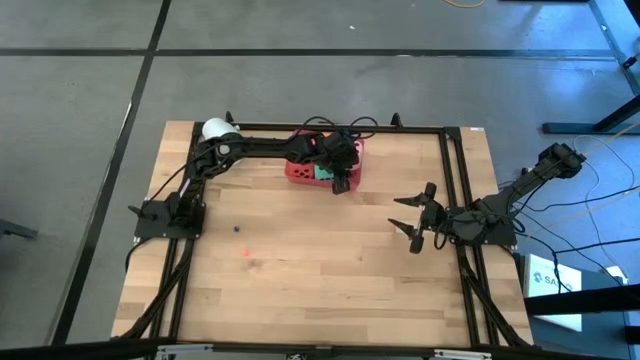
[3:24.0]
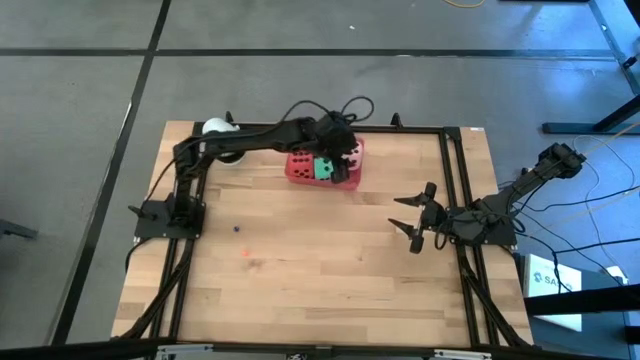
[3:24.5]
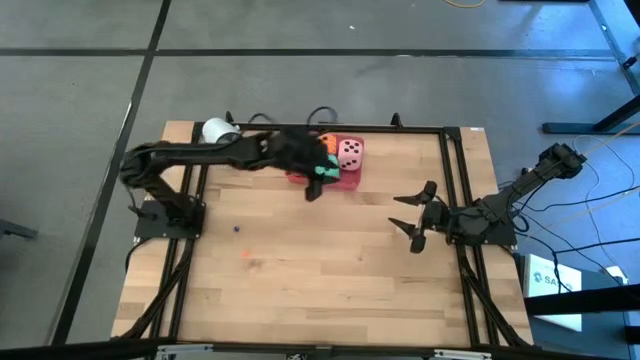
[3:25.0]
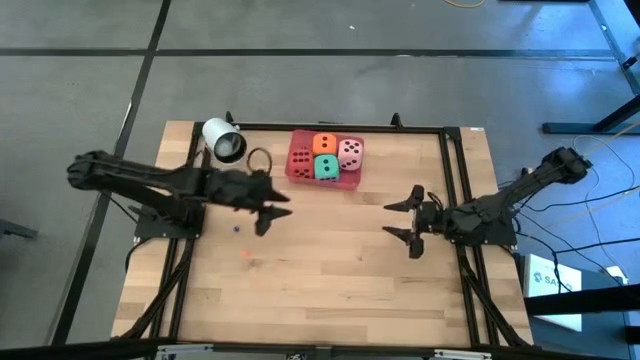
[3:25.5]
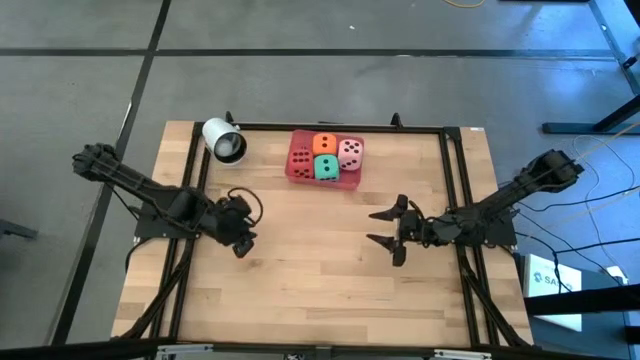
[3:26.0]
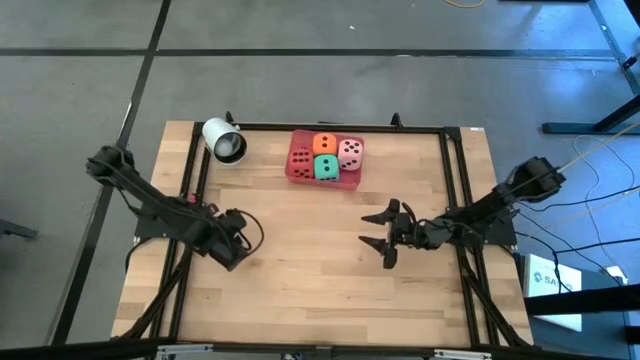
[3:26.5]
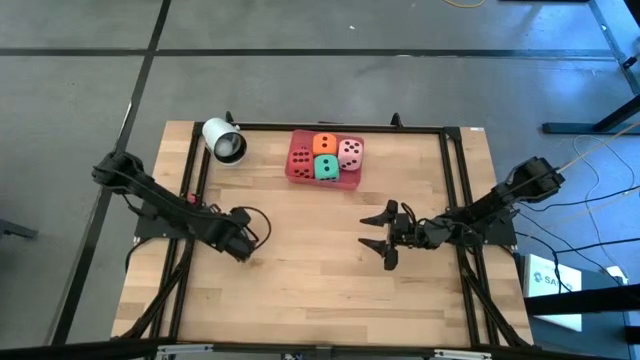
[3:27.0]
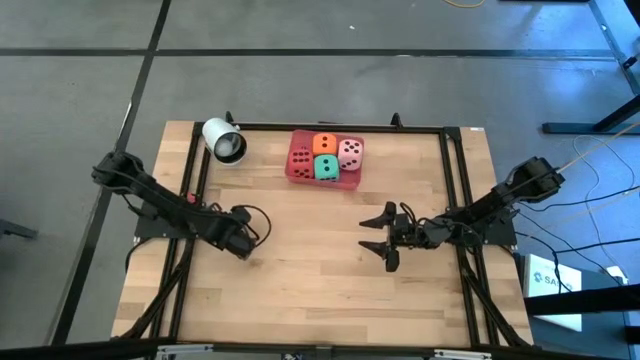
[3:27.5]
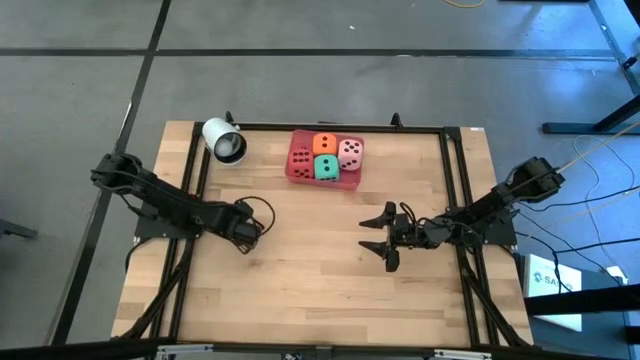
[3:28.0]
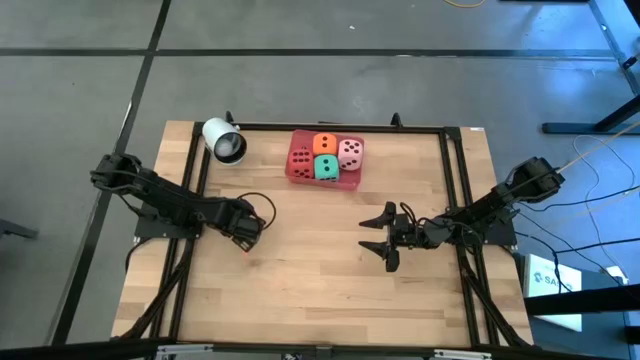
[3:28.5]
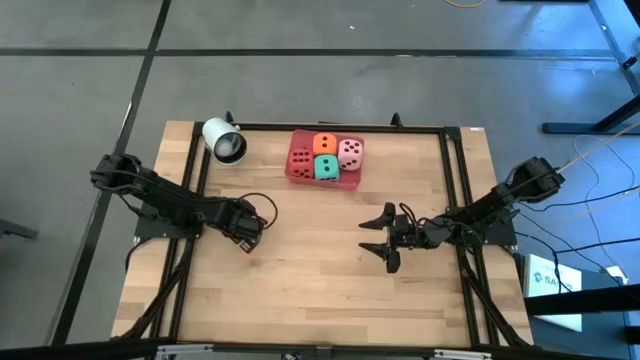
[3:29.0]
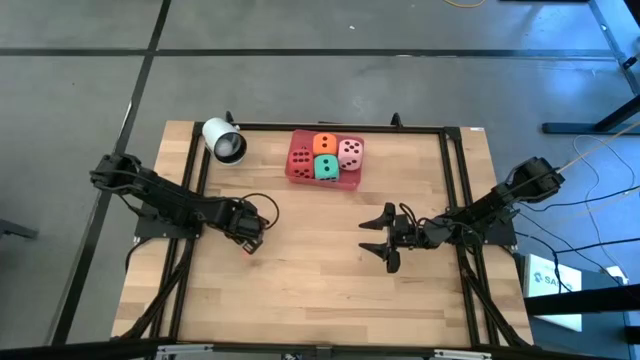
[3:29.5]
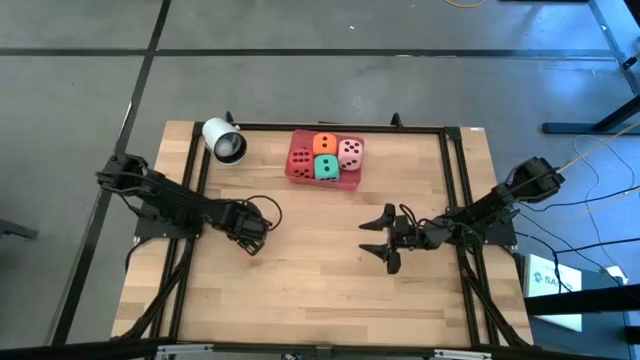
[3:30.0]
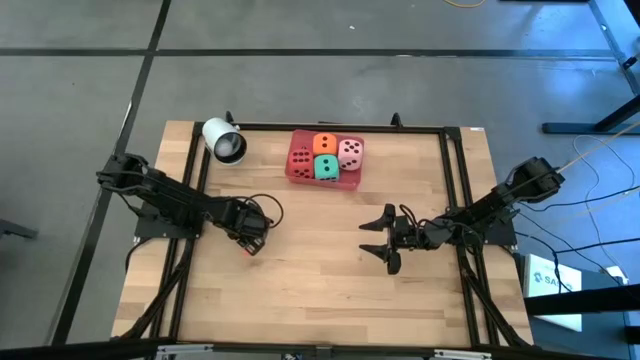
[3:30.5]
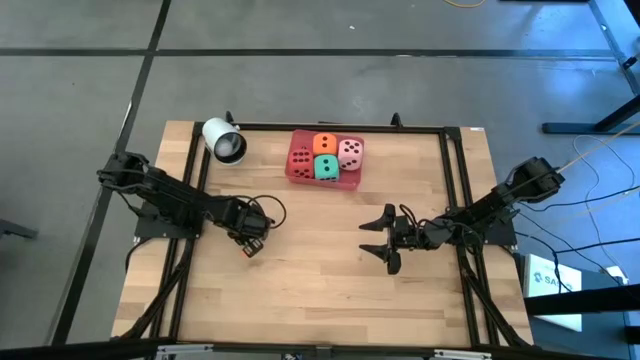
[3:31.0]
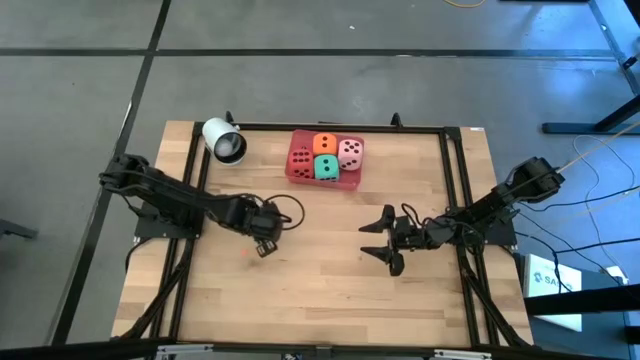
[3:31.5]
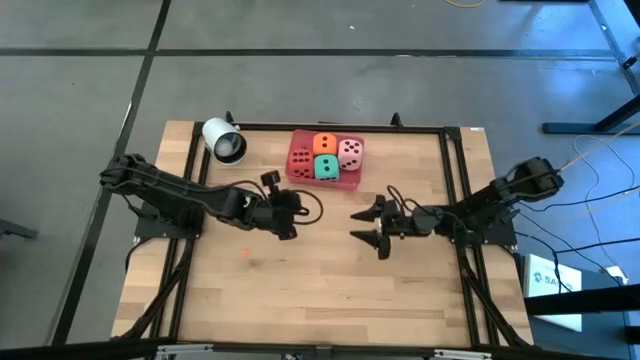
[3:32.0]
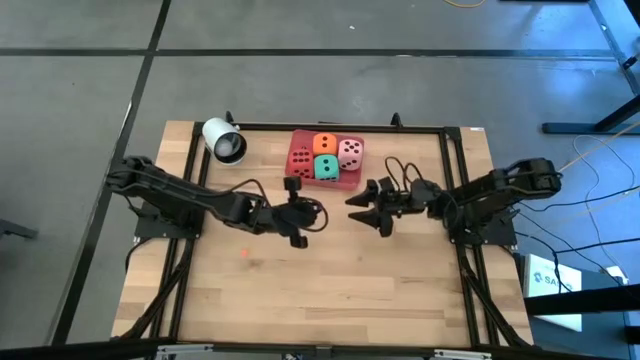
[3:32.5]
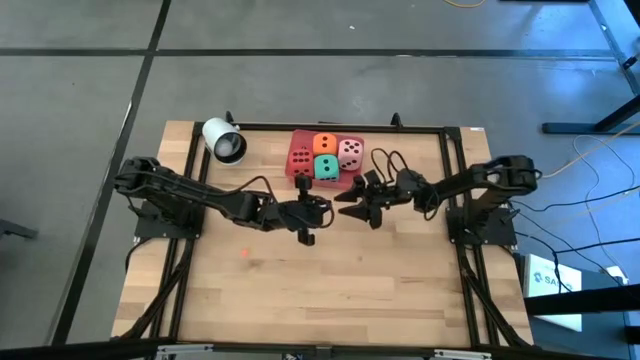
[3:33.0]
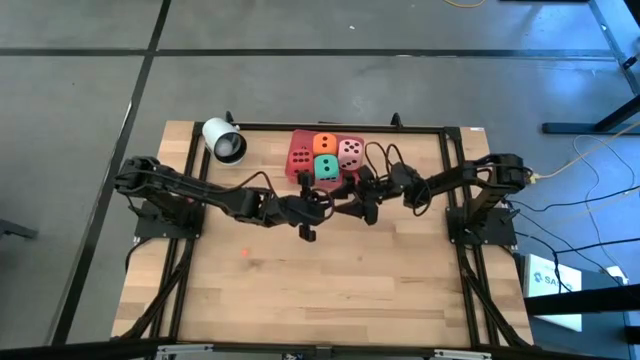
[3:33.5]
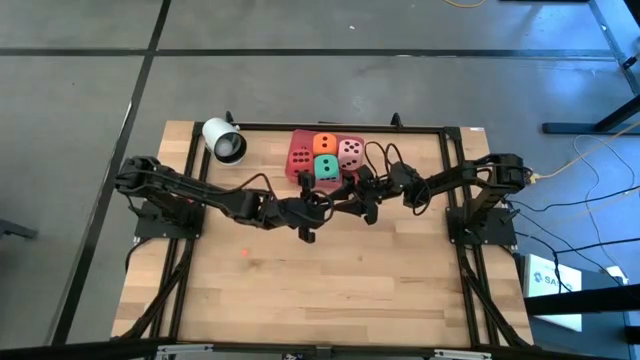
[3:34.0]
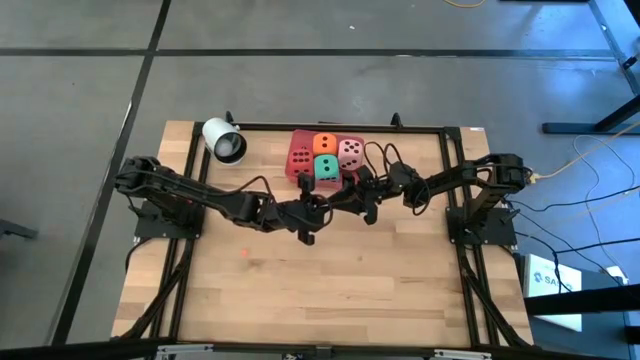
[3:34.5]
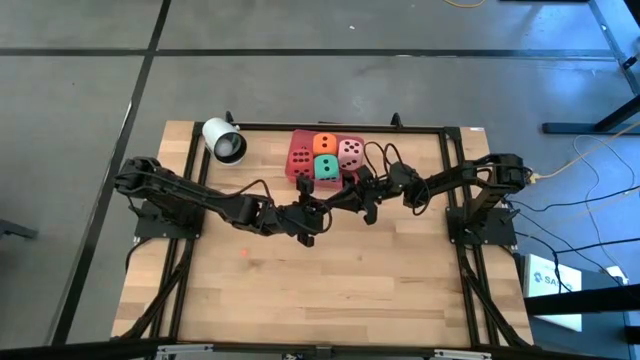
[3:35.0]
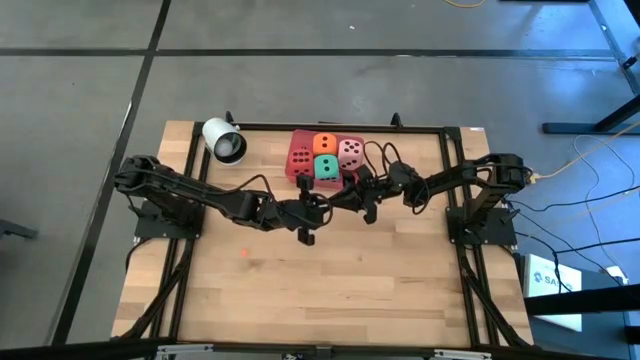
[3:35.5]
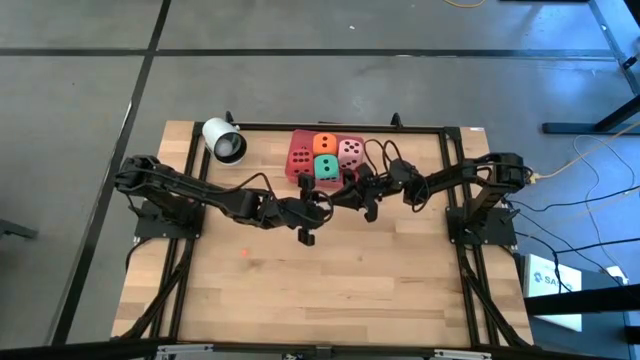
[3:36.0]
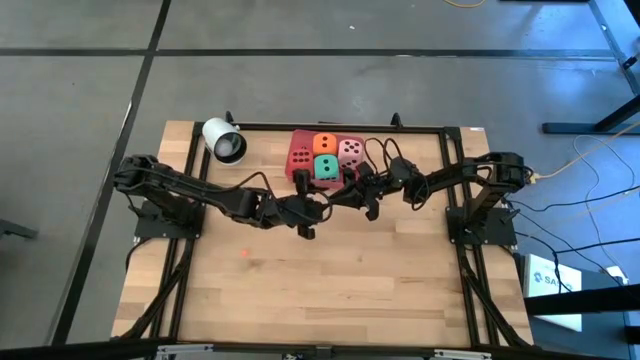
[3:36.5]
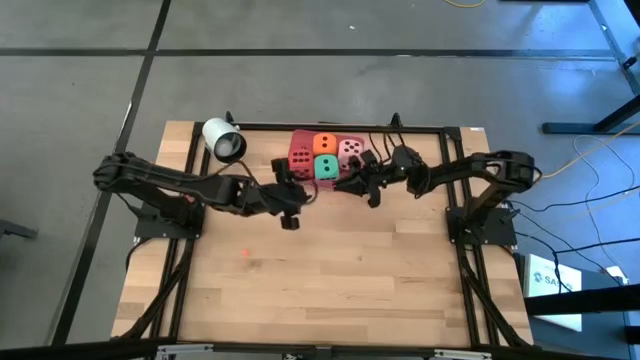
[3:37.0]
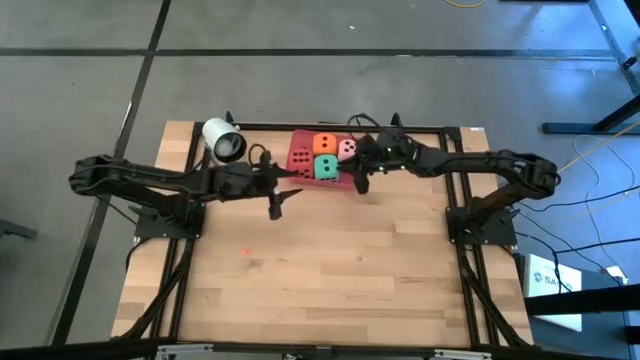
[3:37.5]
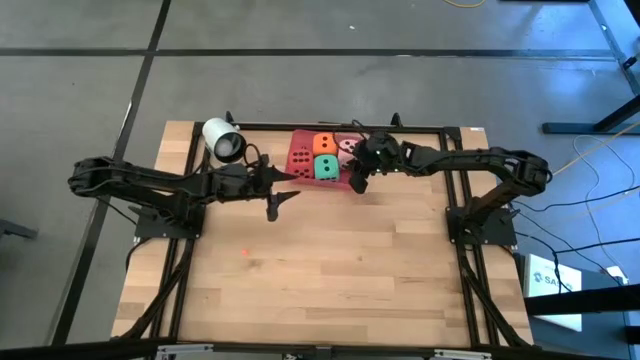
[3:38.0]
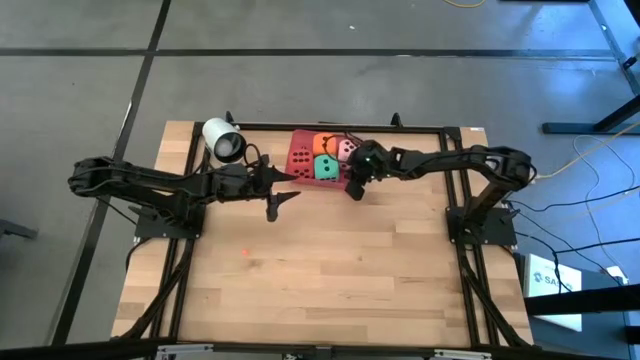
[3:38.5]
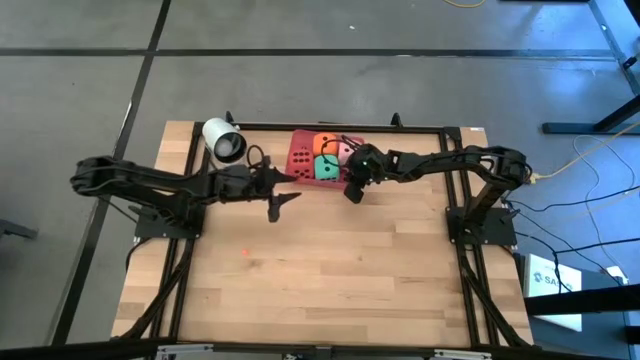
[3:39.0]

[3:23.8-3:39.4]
Task: Pick & Place Dice
Put the blue die into the pink bin

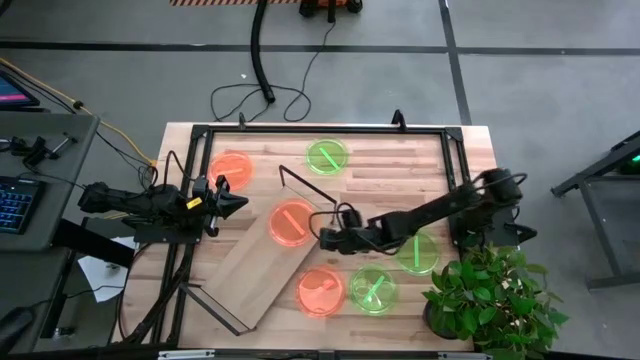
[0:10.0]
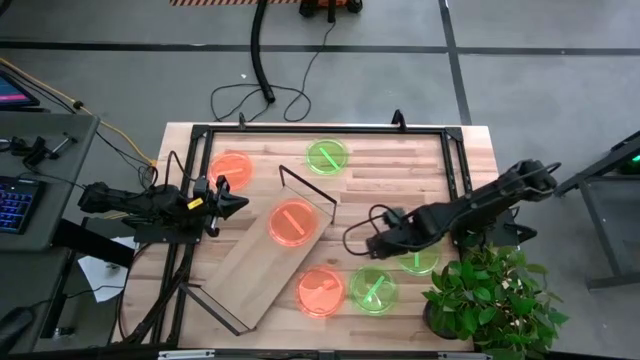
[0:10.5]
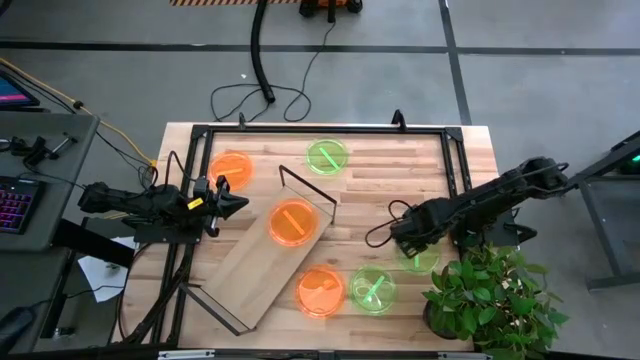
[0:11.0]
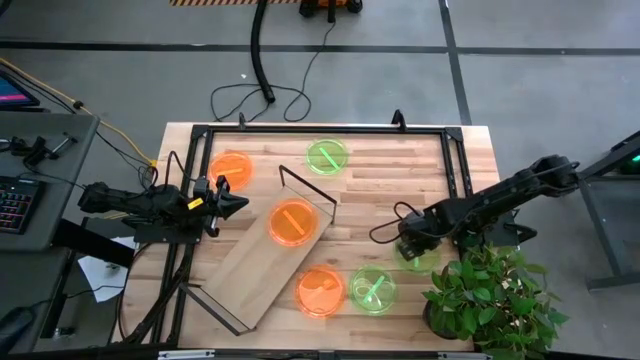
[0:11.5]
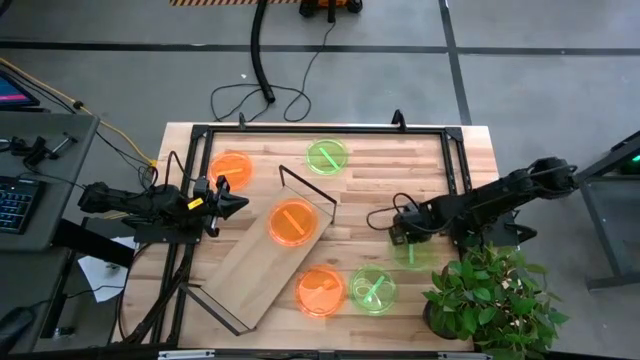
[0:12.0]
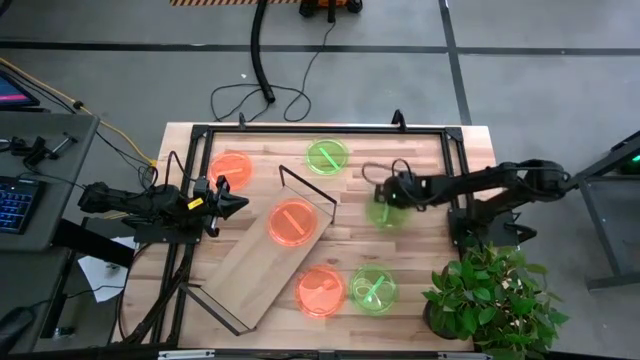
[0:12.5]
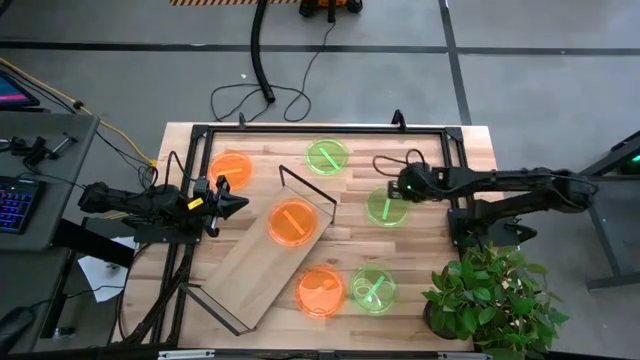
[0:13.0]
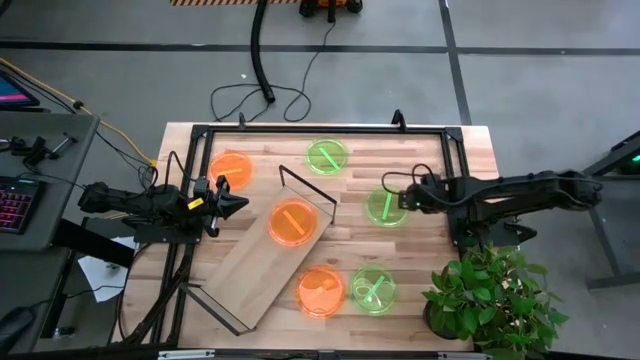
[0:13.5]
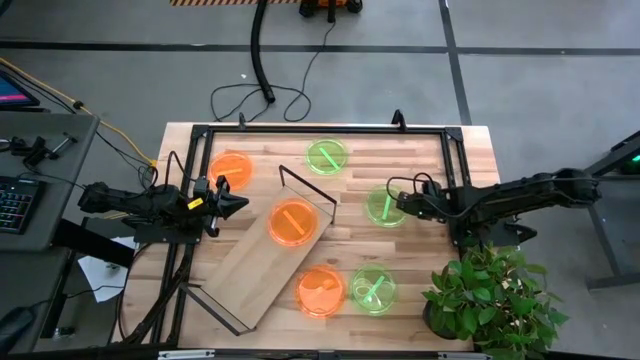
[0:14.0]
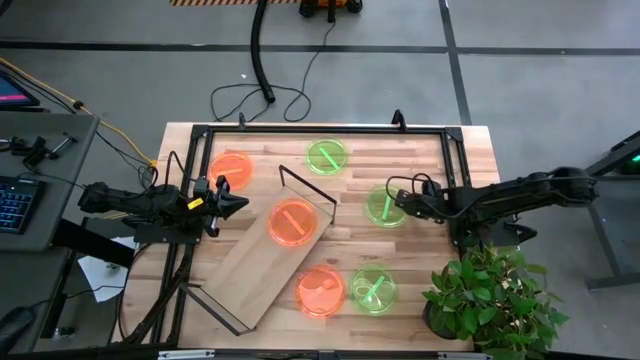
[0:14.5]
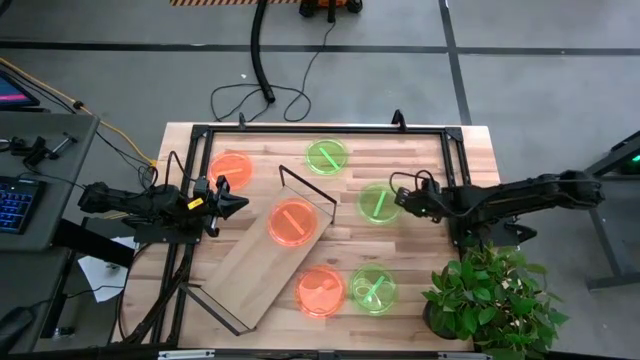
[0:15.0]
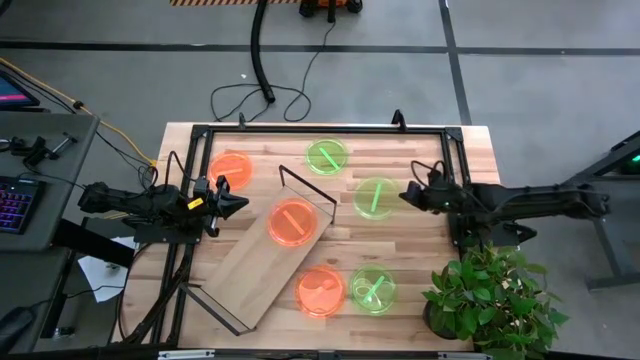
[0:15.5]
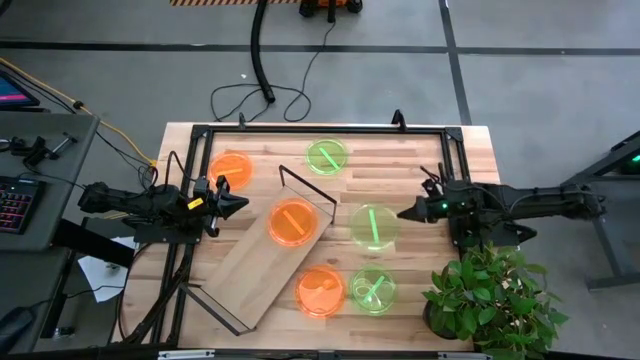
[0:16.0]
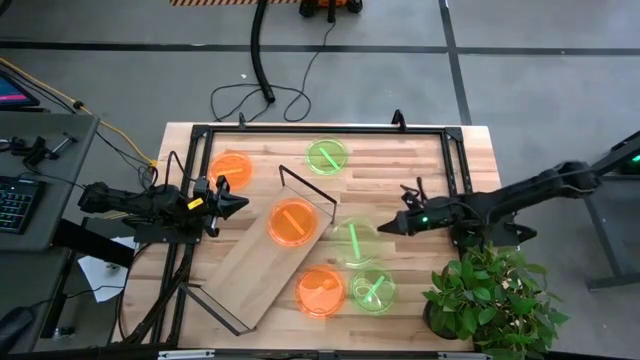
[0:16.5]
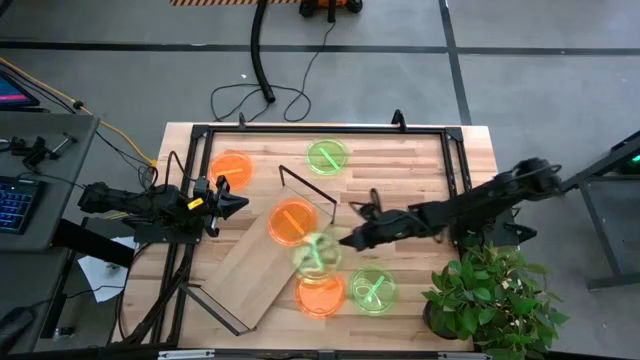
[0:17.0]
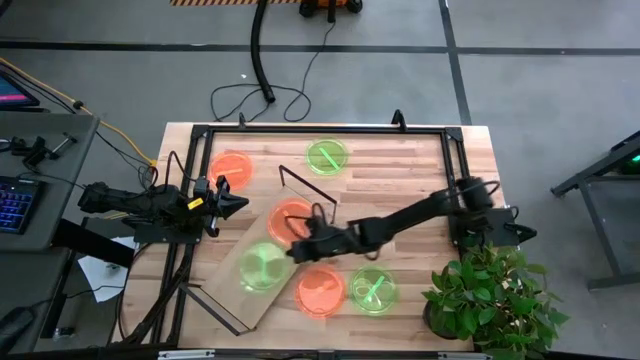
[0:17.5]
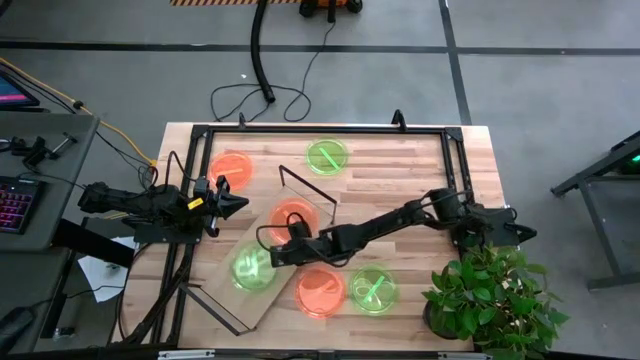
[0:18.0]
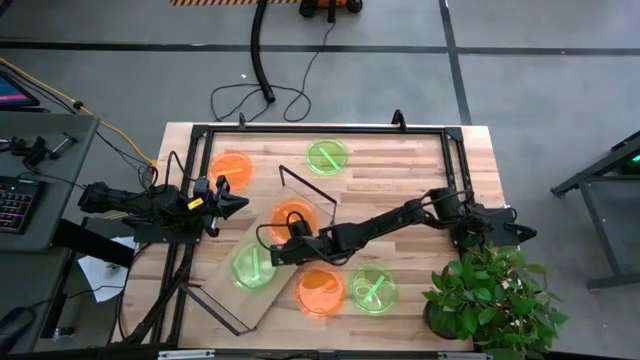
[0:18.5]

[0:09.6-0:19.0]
Task: Place and stack plates onto a shelf
Put the middle right green plate on the shelf
